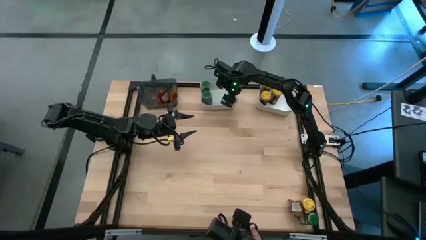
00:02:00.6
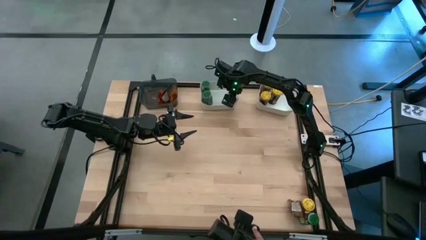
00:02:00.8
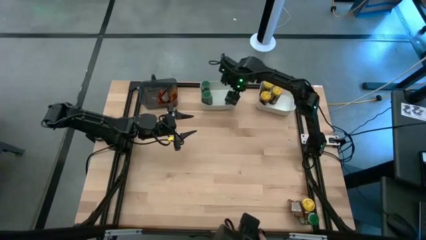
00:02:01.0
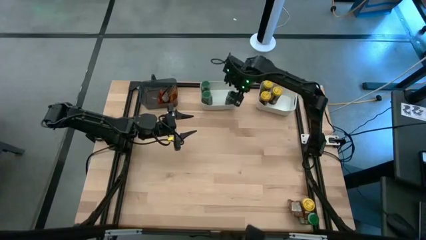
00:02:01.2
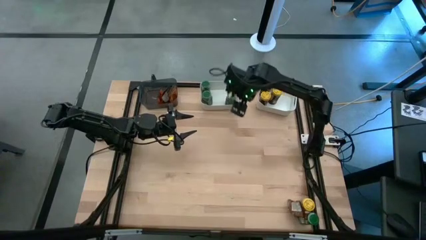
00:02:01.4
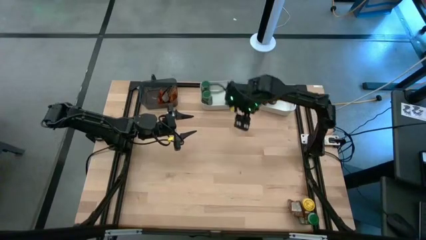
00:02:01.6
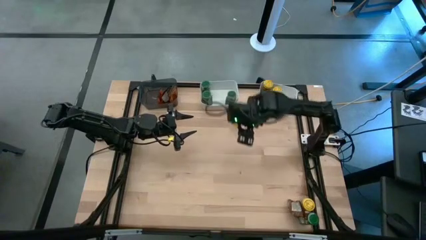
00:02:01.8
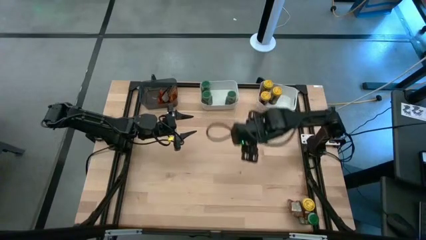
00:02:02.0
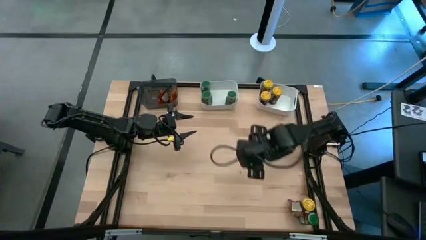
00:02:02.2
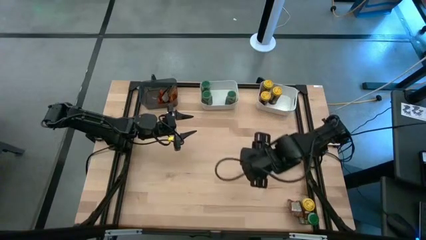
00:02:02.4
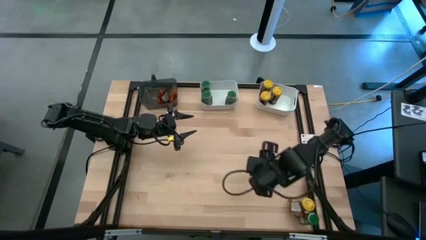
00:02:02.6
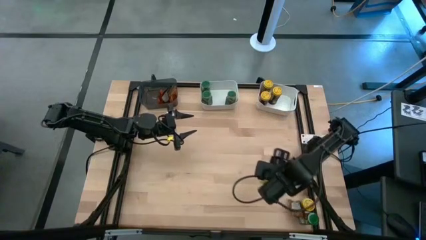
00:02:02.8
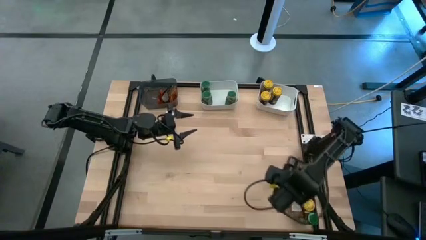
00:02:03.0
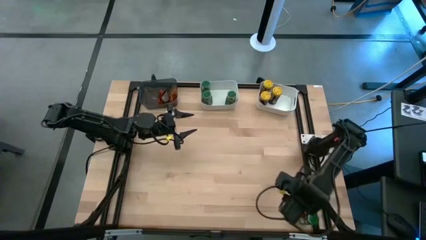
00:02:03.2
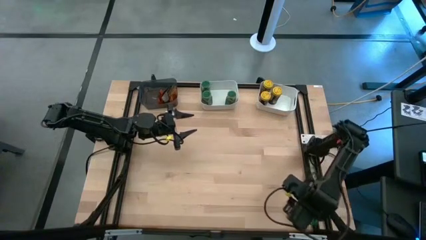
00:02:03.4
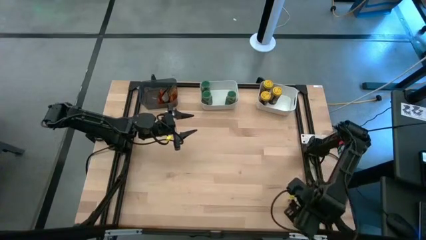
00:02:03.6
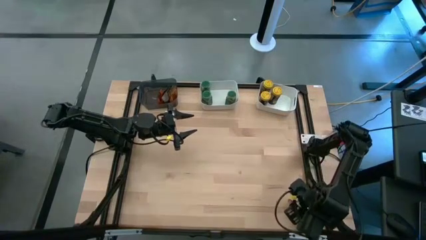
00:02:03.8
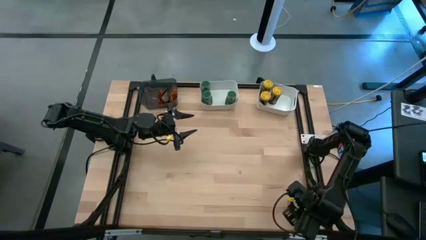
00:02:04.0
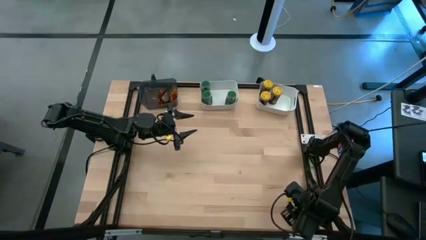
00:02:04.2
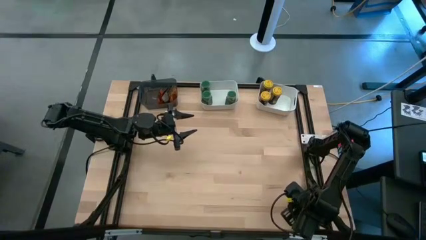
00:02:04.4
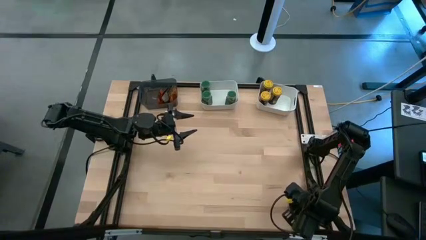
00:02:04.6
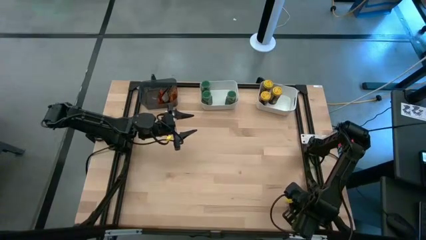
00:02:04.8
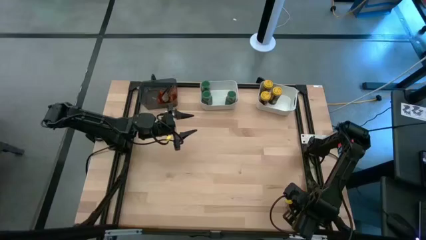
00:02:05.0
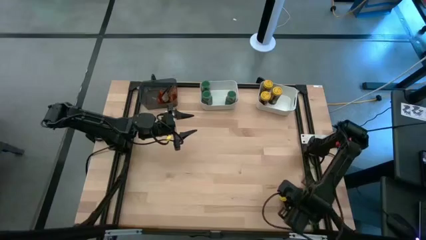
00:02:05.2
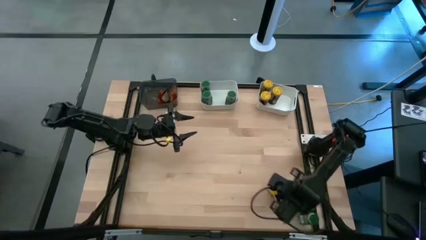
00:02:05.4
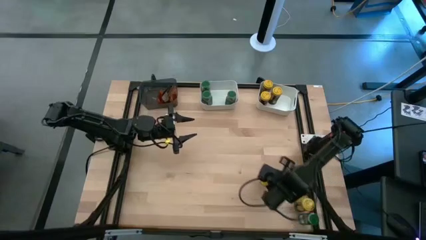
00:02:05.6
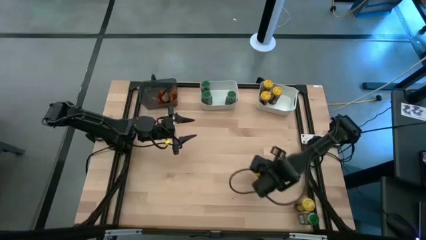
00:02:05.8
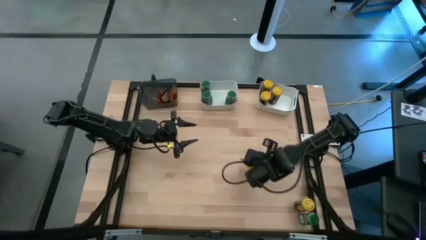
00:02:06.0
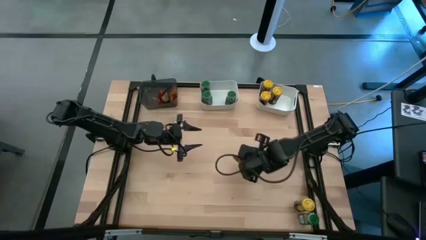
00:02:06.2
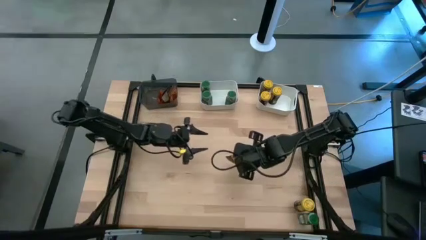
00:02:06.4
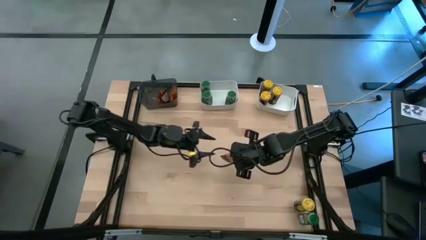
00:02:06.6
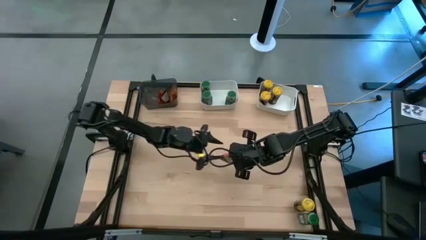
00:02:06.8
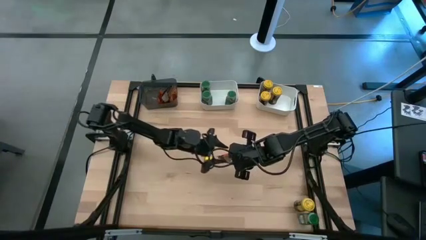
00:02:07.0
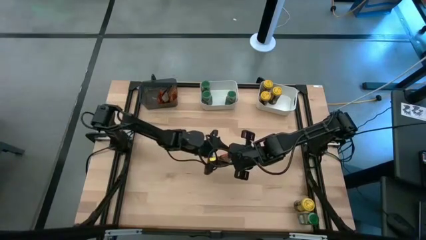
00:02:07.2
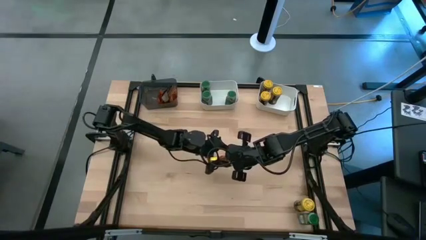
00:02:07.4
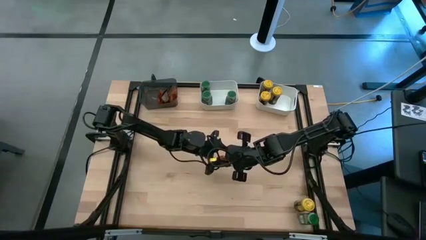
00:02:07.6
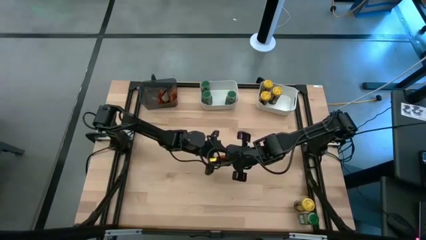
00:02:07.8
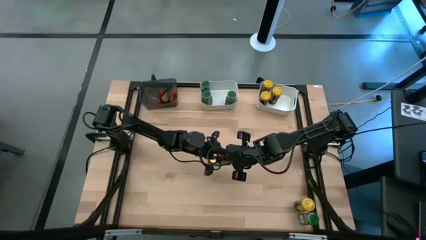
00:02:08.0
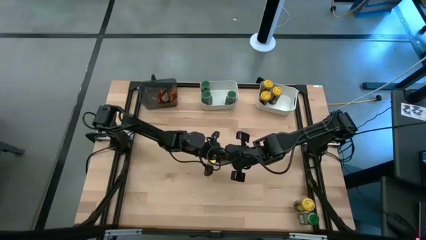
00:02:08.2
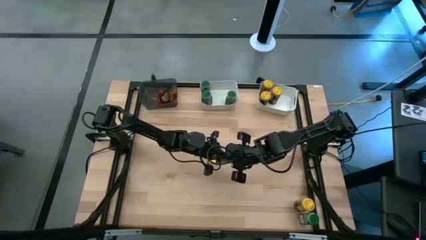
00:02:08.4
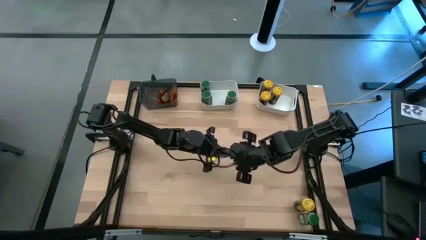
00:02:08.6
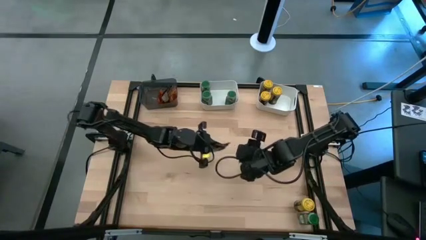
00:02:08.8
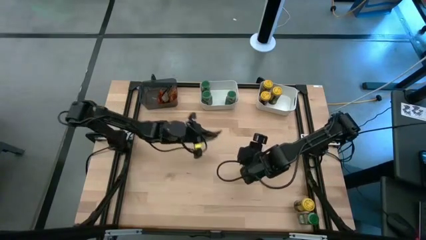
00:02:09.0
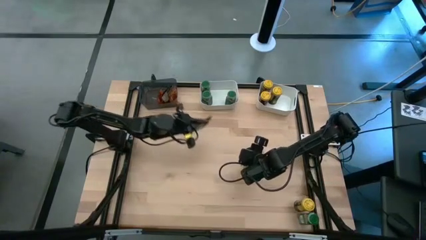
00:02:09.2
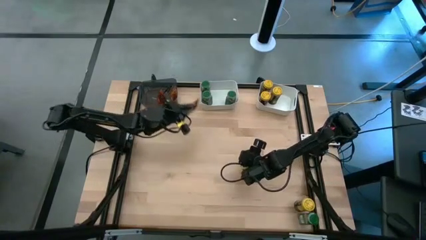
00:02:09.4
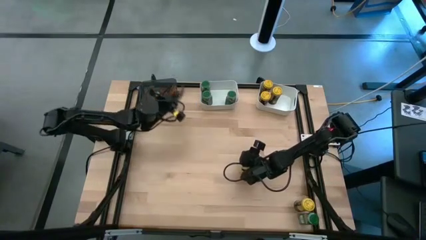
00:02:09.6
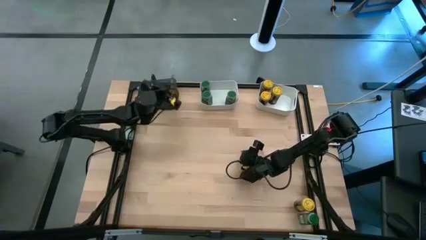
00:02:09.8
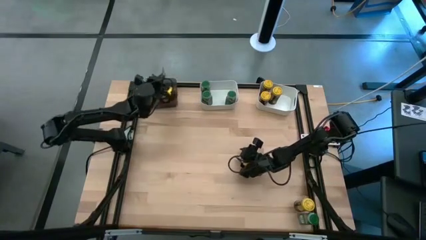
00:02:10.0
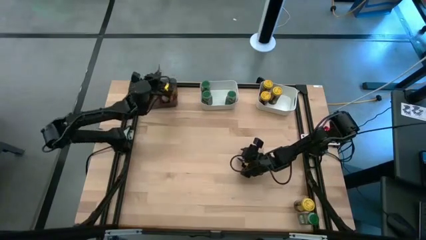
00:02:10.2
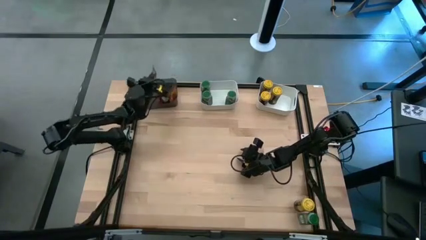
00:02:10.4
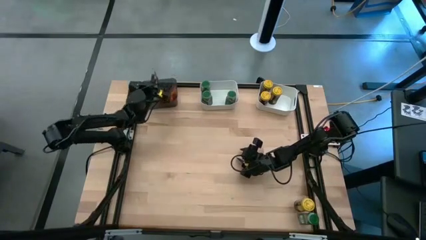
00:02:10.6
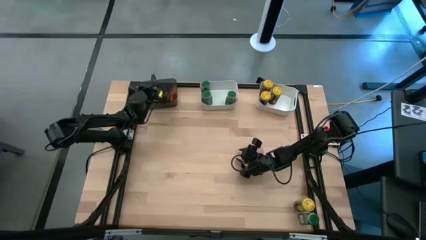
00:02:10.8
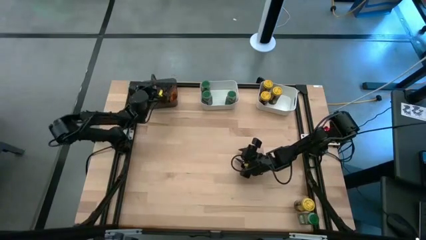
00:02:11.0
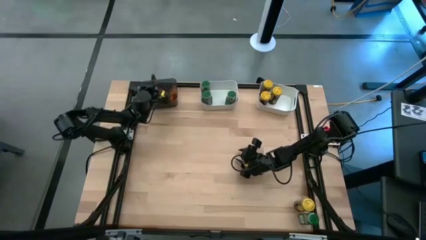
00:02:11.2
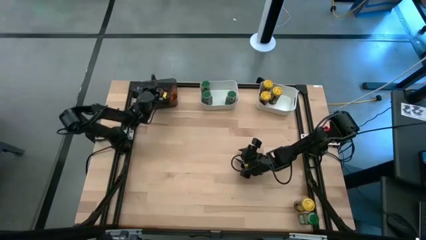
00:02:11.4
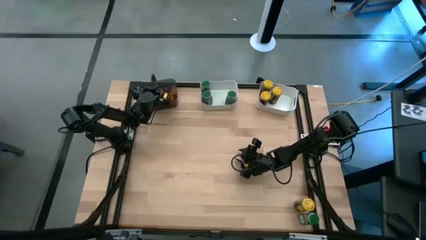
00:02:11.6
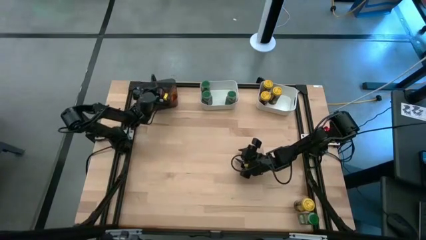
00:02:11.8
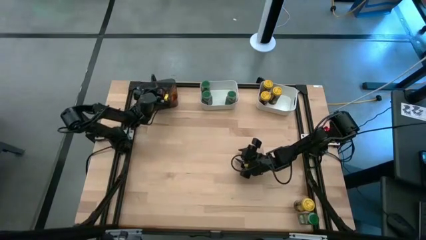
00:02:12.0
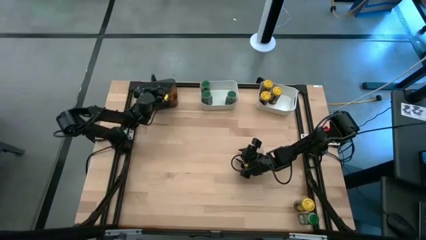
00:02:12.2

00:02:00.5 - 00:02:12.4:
Task: Sort spices by type
Put the brown seasoning bag into the black bin

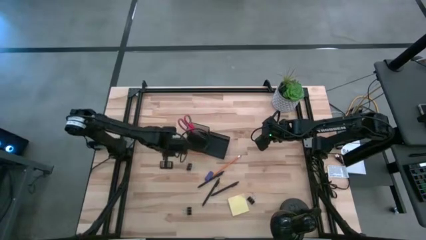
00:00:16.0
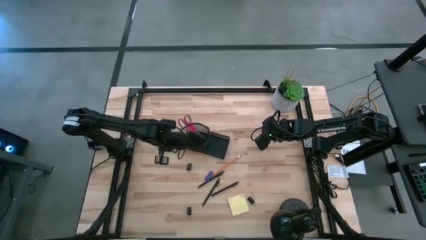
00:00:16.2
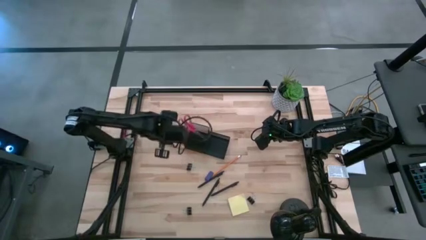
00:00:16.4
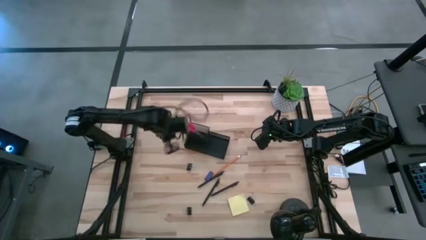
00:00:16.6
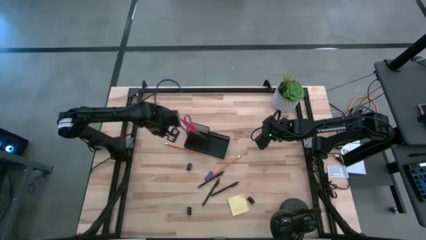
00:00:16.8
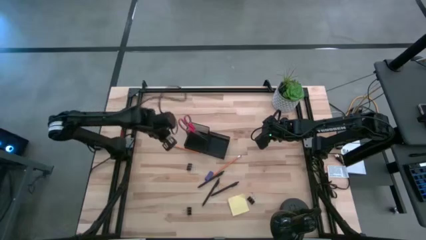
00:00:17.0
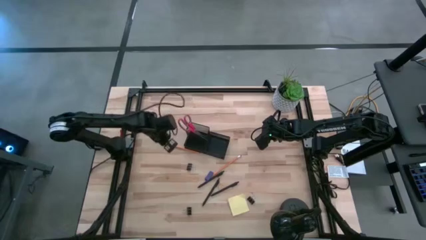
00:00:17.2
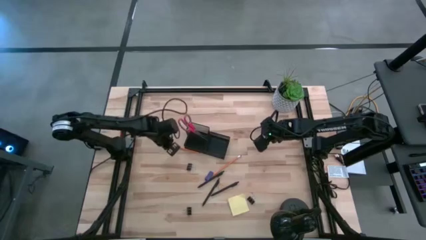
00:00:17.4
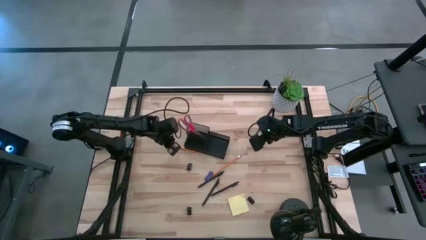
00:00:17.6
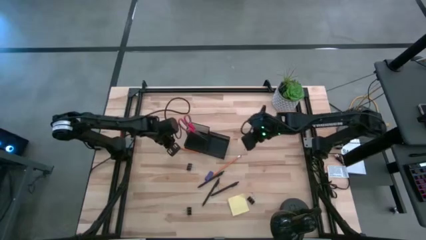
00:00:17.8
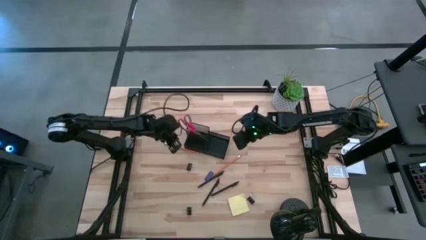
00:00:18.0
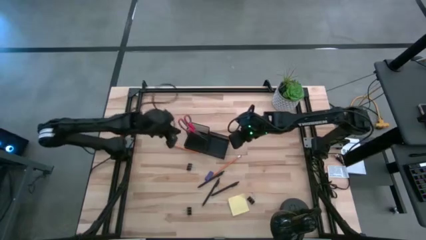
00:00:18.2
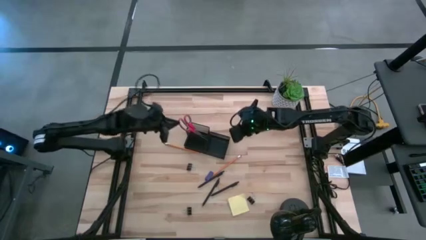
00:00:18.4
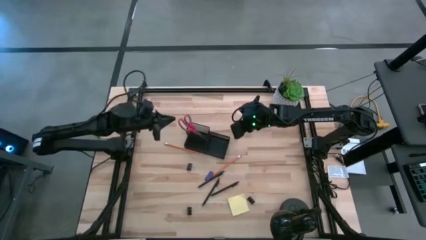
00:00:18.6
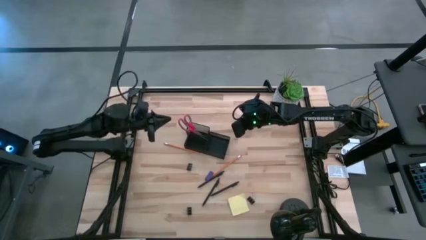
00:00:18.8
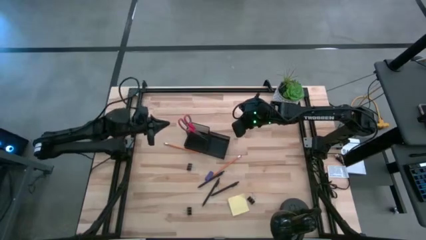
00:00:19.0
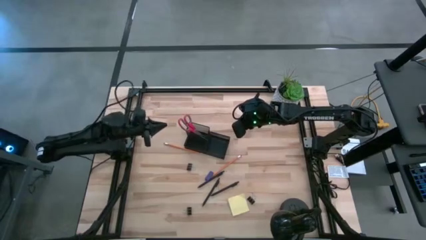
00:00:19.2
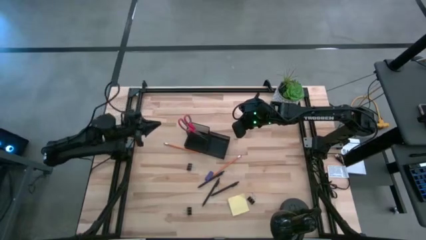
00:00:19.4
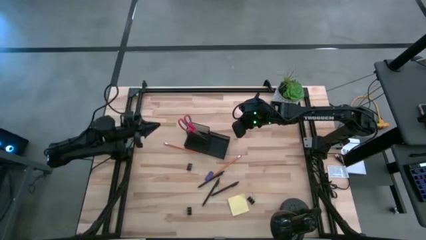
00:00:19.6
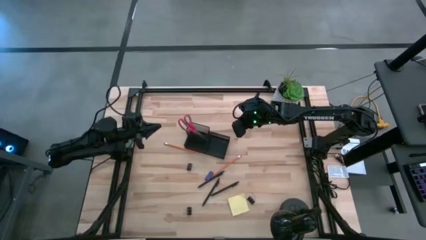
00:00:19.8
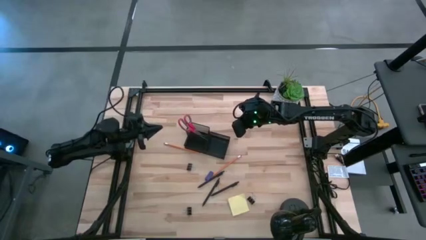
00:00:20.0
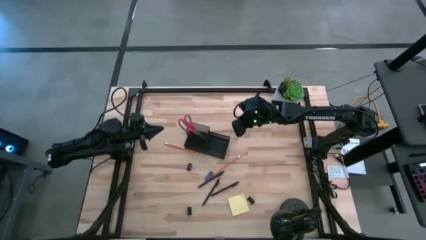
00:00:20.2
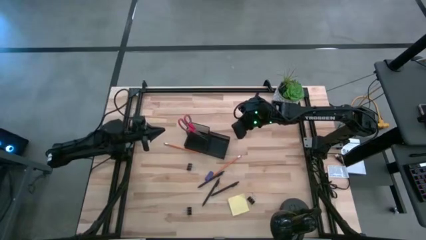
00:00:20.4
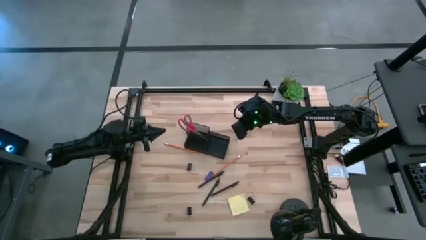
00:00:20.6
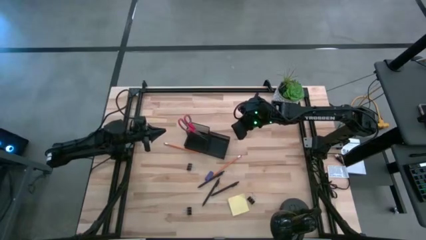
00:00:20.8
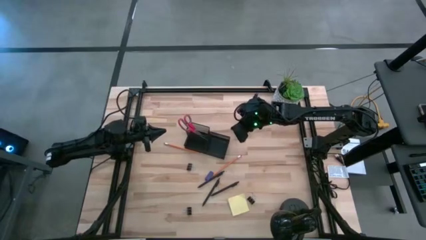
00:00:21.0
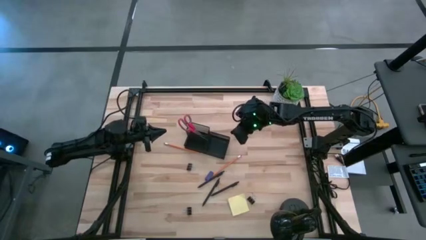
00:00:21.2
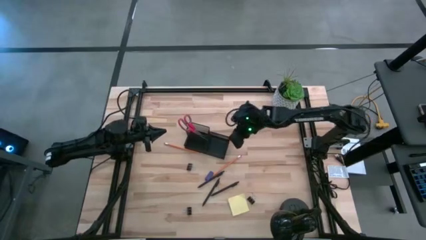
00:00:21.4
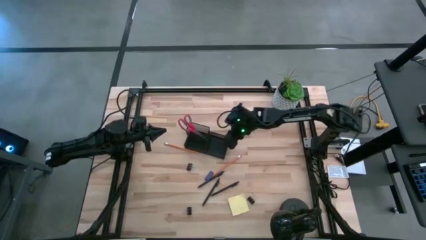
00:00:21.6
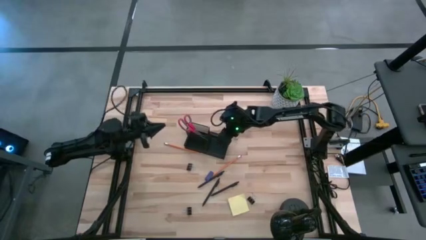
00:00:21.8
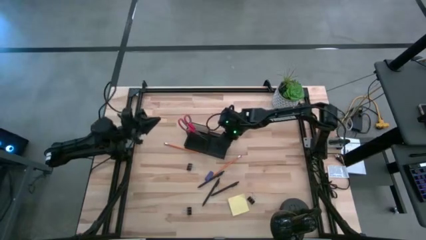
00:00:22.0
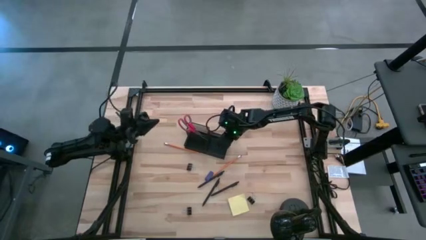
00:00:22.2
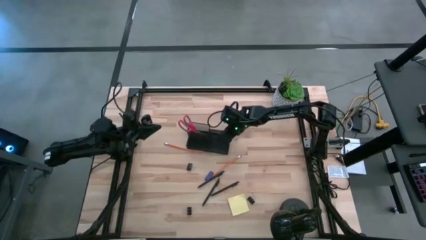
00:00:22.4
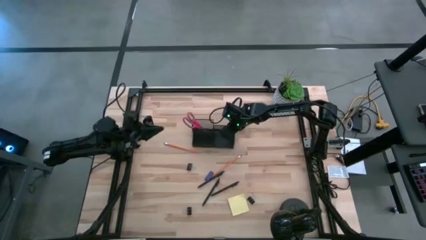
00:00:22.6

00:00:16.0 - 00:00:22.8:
Task: Pick and place office supplies into organizer
Adjust the desk organizer on the table
